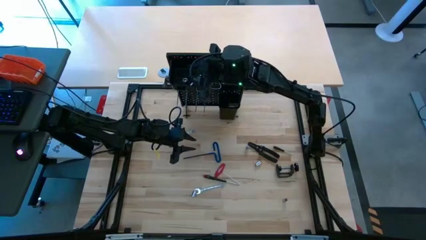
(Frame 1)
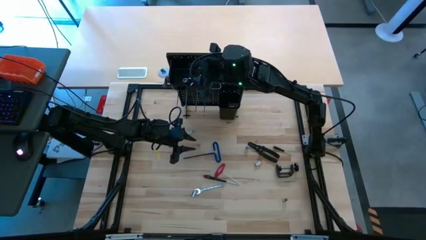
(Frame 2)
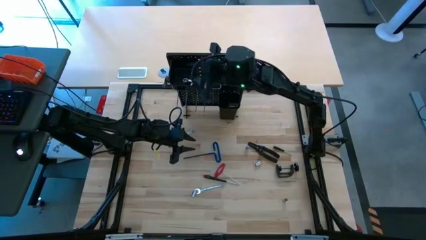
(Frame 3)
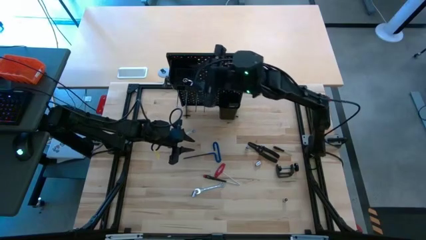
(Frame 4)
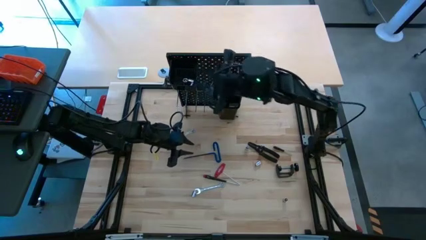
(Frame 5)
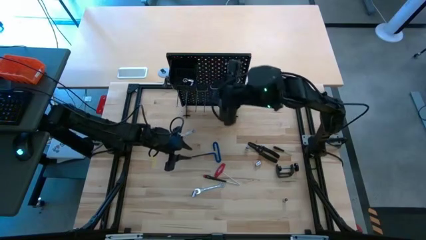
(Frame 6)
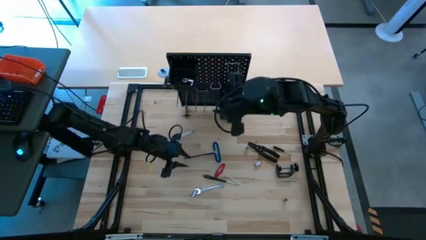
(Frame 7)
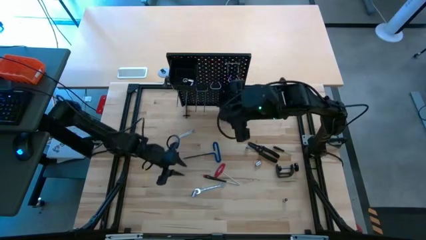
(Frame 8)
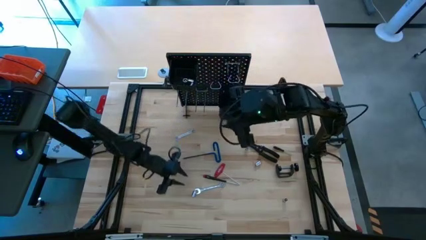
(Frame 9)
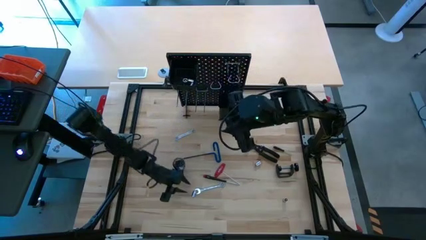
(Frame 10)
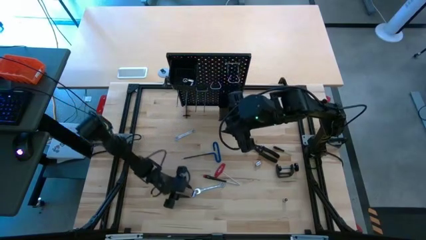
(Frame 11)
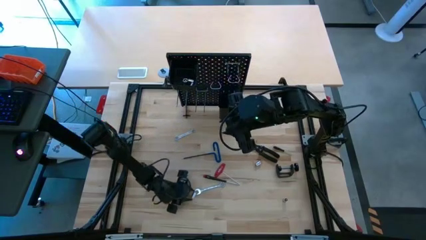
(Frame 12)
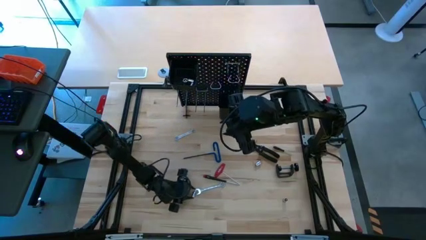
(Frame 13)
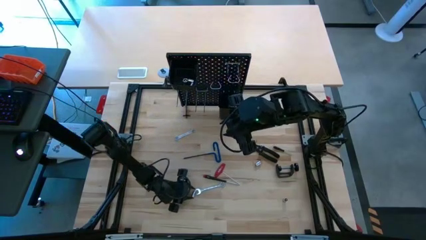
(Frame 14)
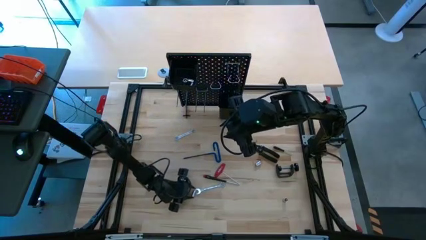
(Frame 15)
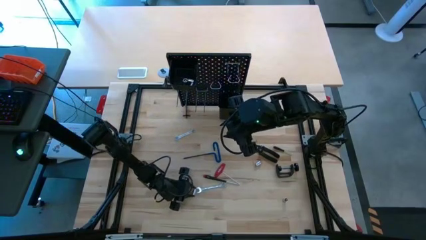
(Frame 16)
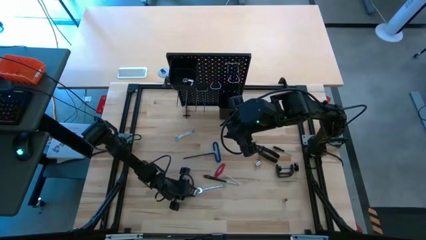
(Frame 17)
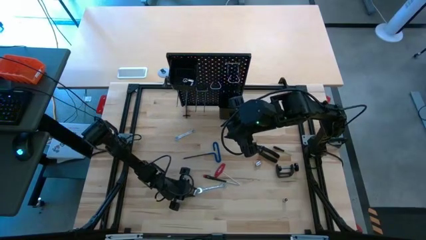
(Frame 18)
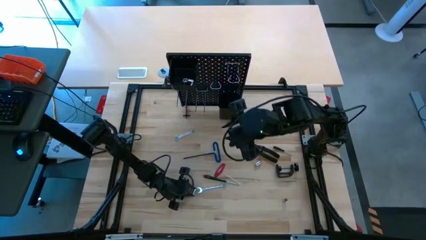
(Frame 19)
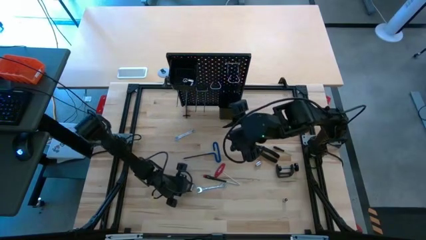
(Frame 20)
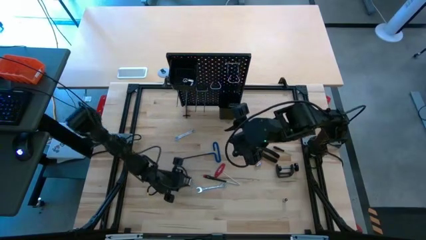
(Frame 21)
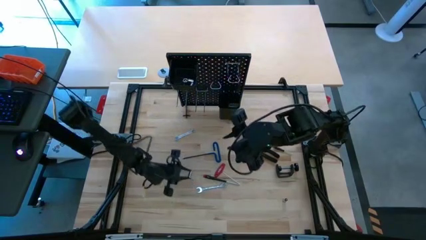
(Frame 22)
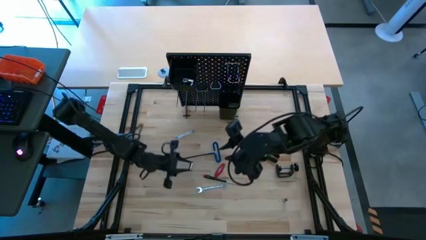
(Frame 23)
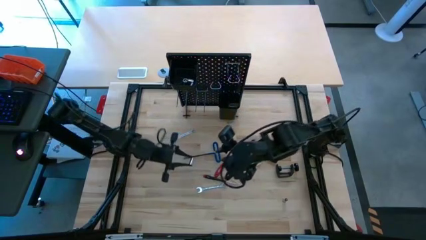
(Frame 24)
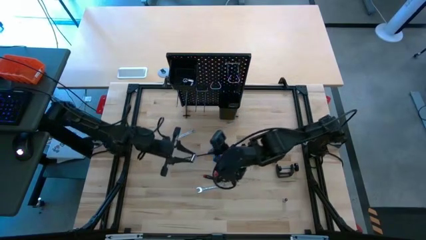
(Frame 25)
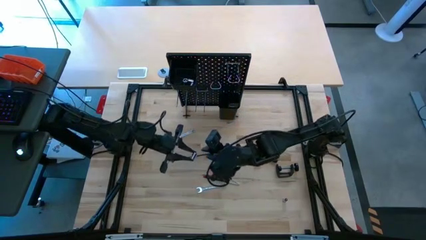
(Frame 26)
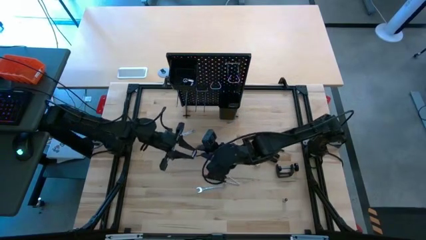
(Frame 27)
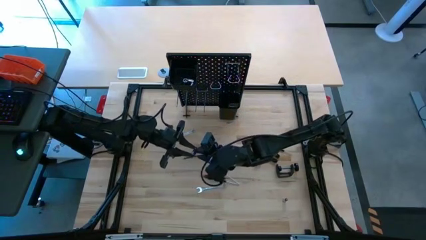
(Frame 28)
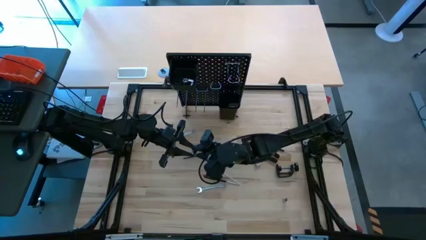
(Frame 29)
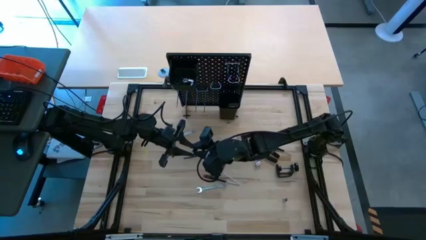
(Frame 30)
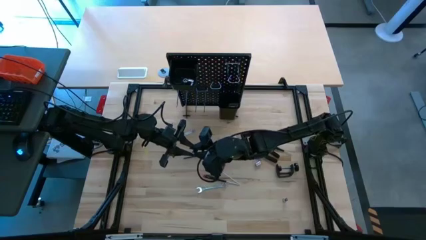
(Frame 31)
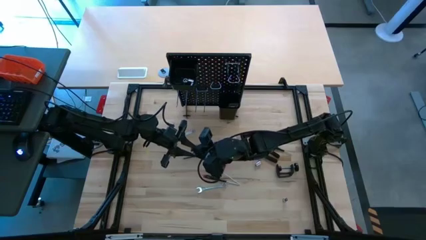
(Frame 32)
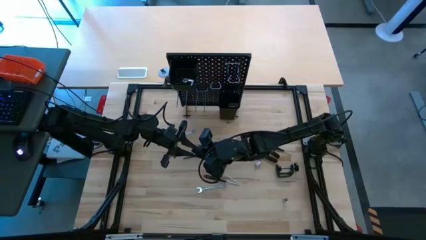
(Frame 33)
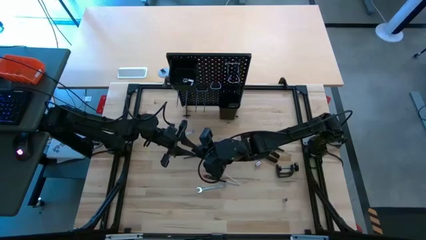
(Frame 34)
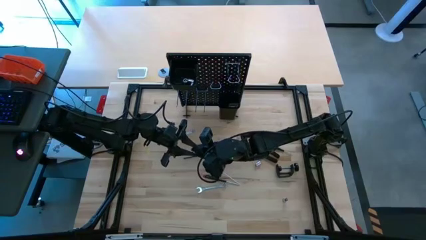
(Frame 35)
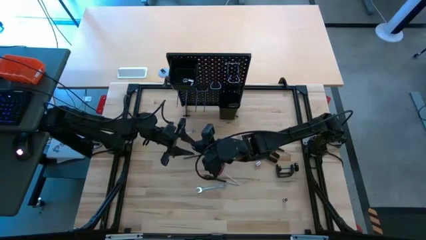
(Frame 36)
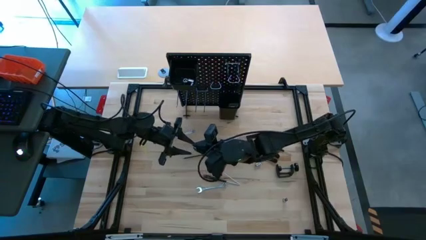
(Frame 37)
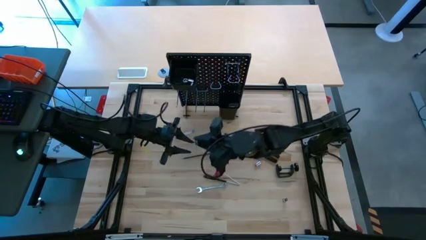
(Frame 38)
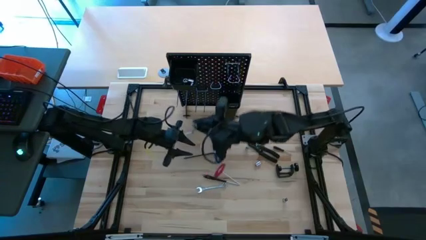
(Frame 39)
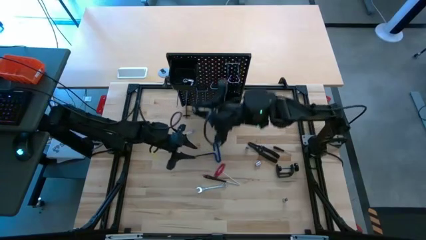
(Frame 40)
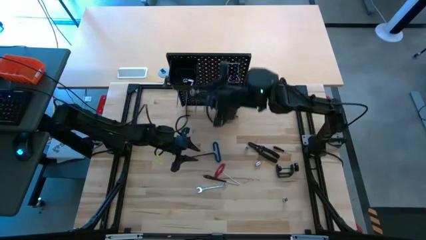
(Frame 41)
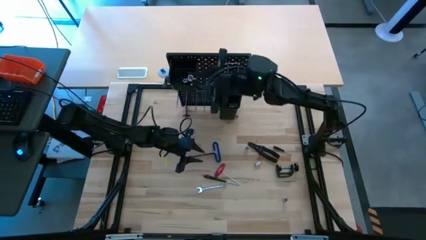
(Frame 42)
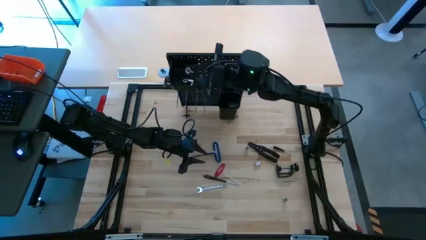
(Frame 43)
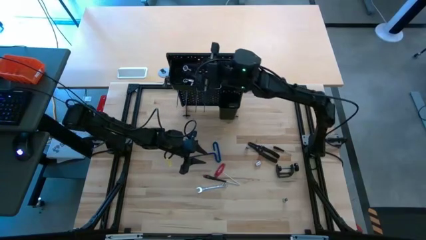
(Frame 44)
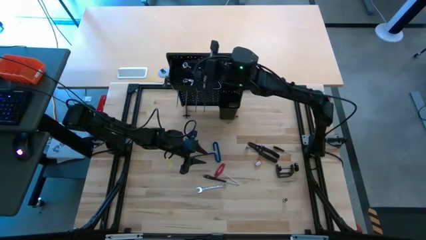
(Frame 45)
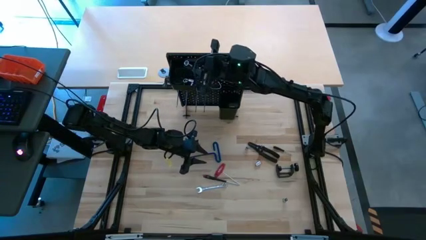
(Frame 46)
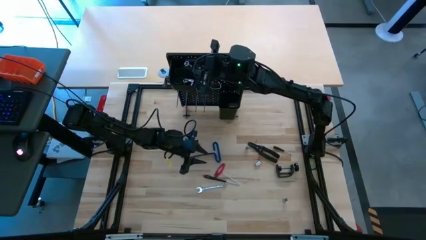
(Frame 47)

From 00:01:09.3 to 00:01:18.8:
Task: Hang tools onto peg board
Put the socket into the top black bin on the pegboard
